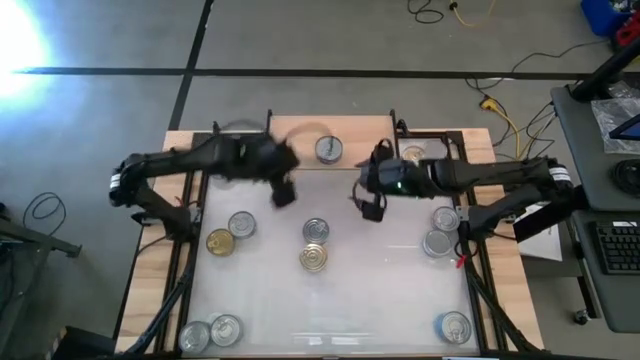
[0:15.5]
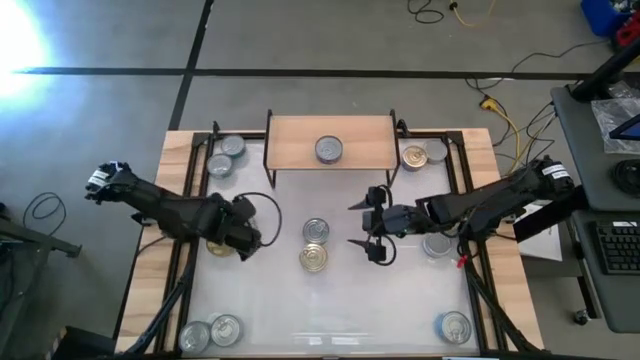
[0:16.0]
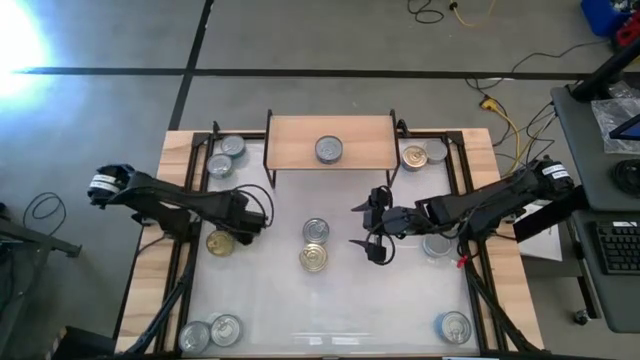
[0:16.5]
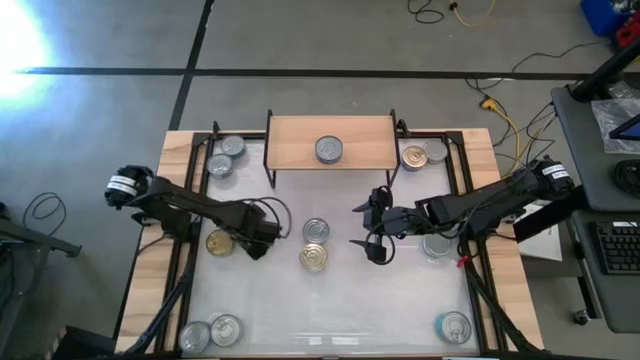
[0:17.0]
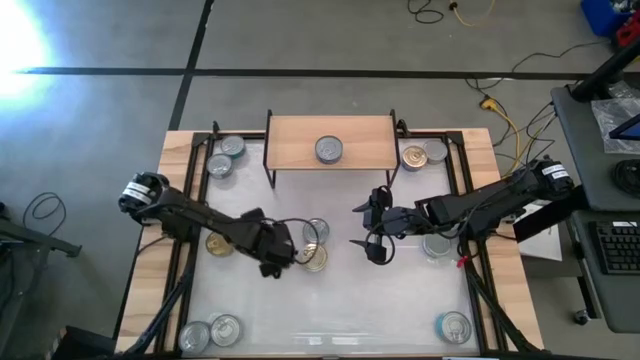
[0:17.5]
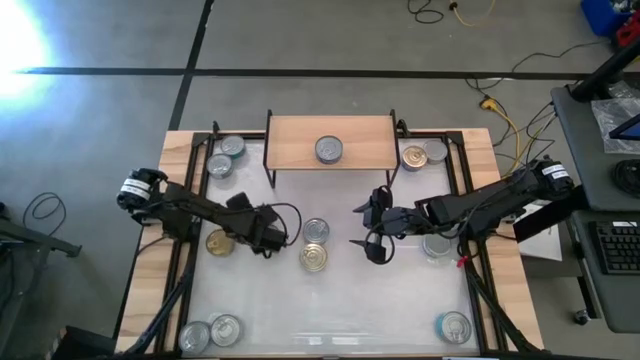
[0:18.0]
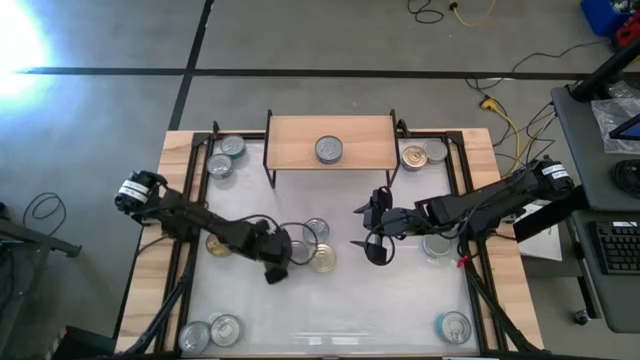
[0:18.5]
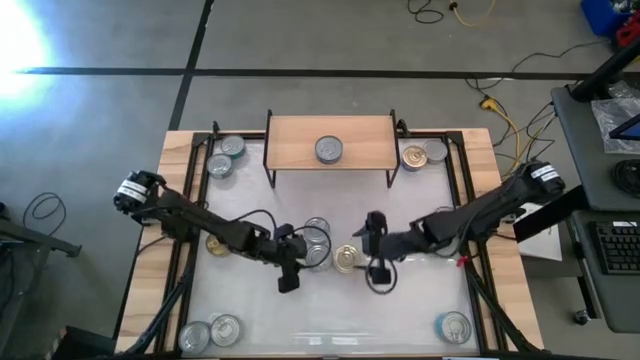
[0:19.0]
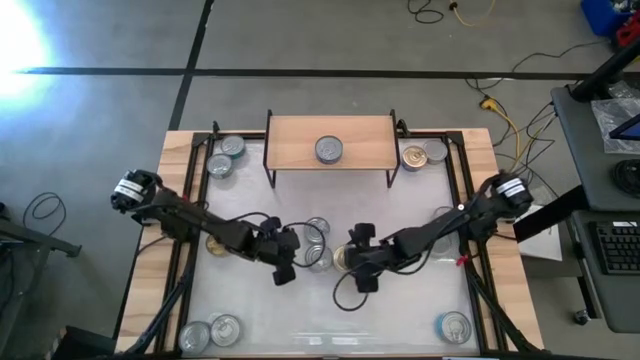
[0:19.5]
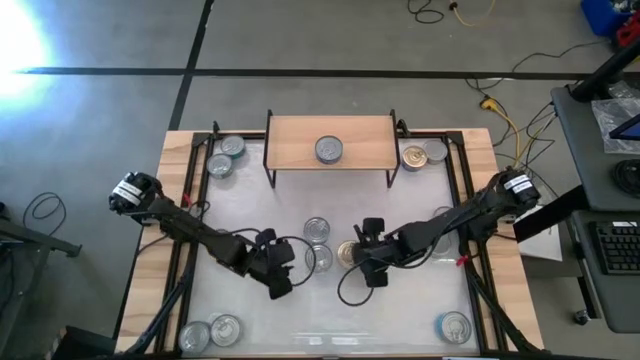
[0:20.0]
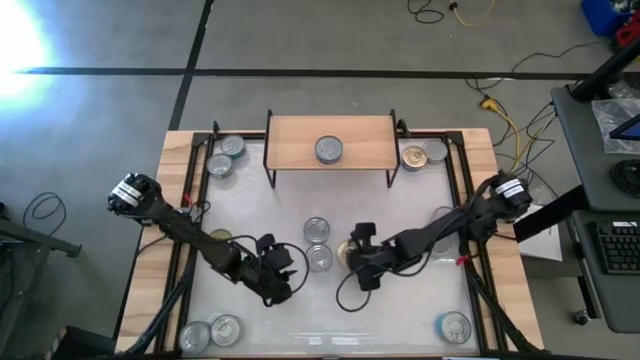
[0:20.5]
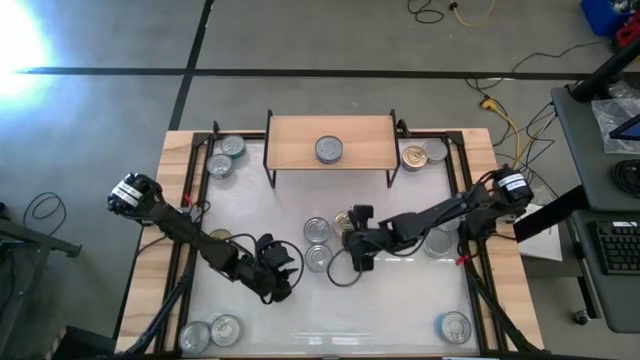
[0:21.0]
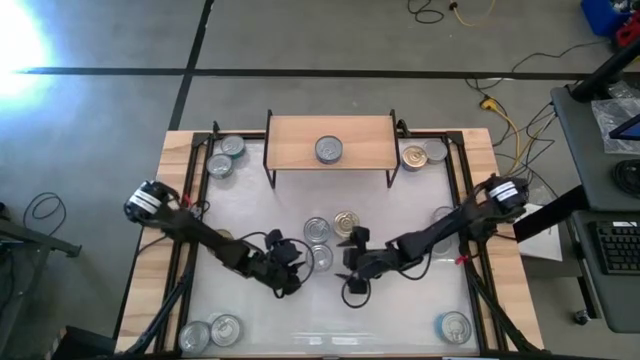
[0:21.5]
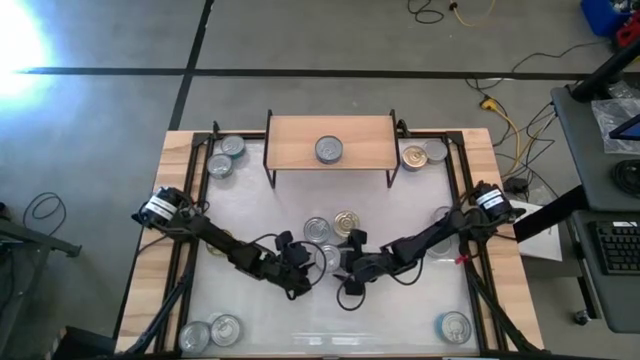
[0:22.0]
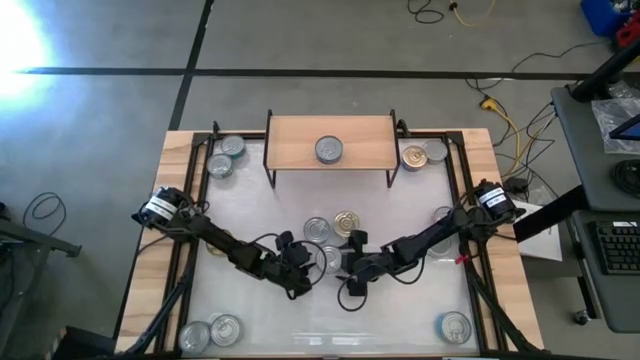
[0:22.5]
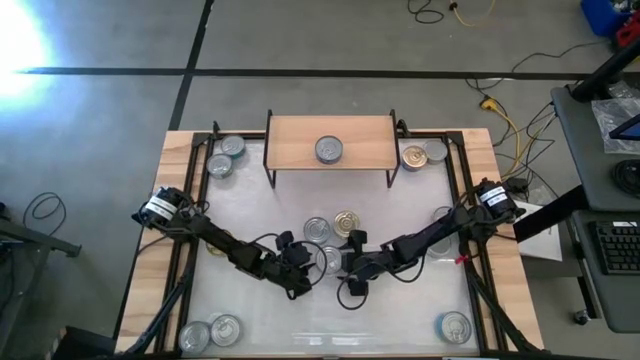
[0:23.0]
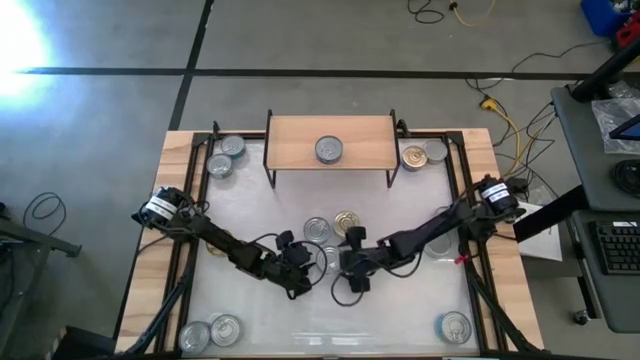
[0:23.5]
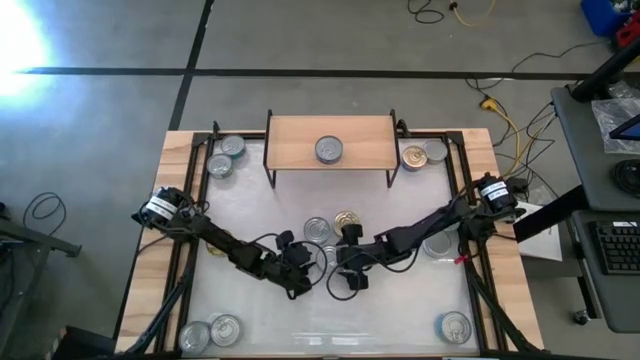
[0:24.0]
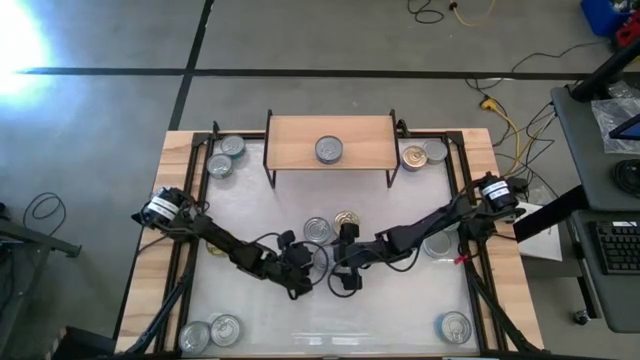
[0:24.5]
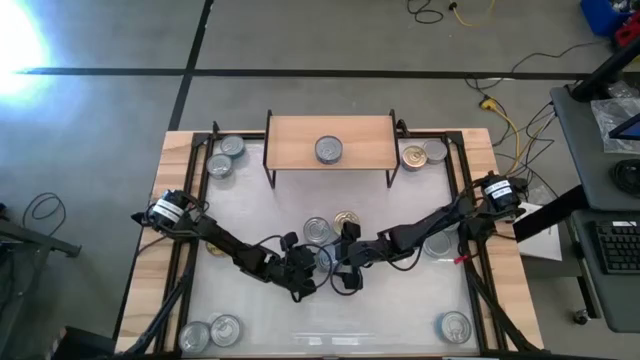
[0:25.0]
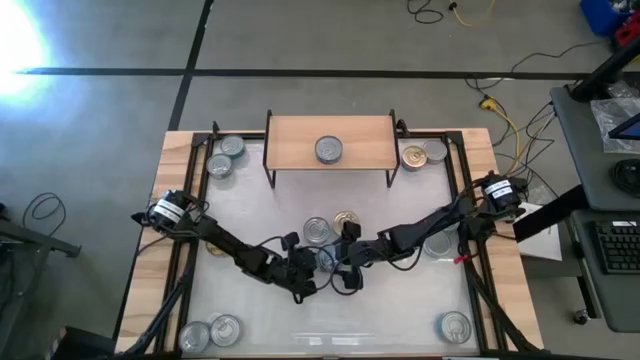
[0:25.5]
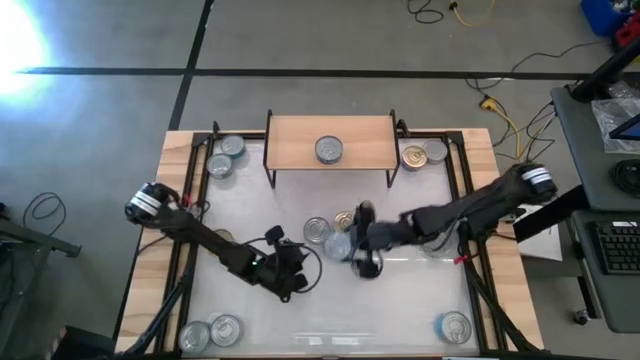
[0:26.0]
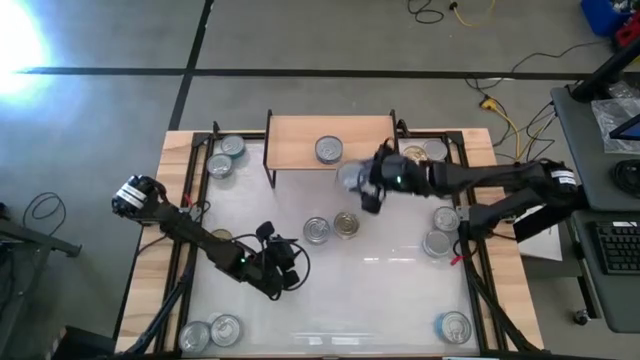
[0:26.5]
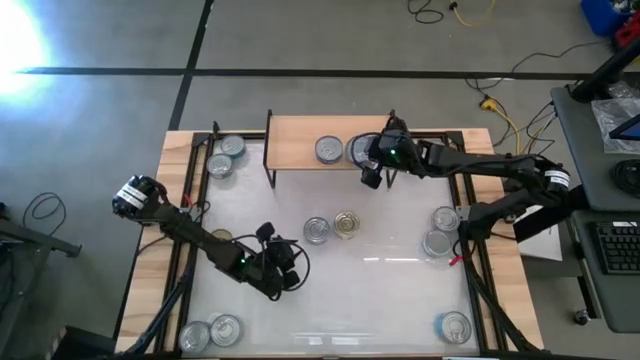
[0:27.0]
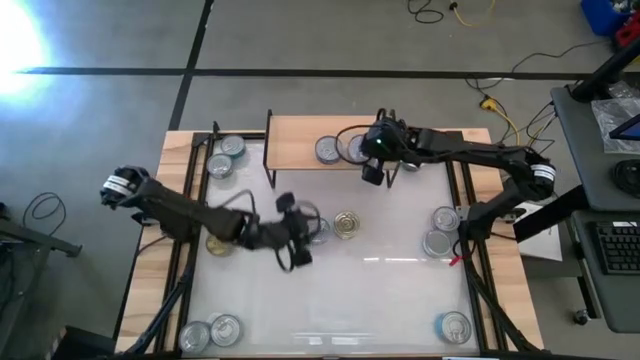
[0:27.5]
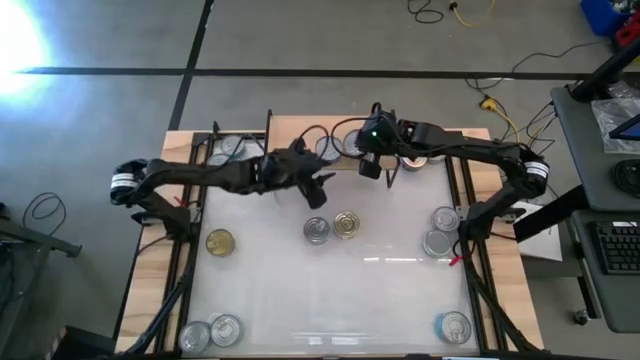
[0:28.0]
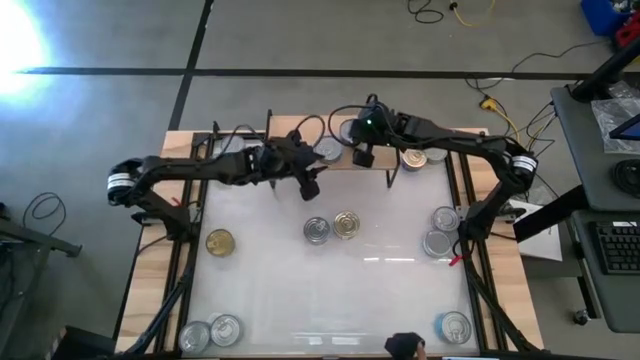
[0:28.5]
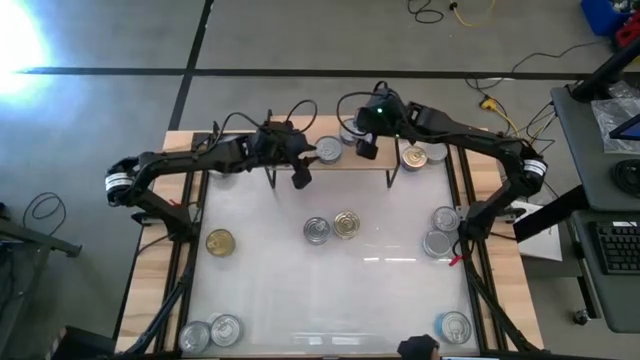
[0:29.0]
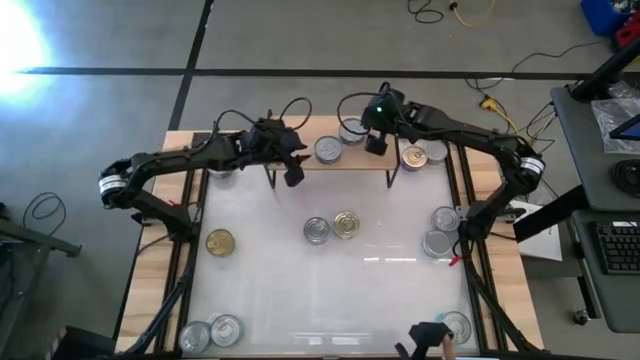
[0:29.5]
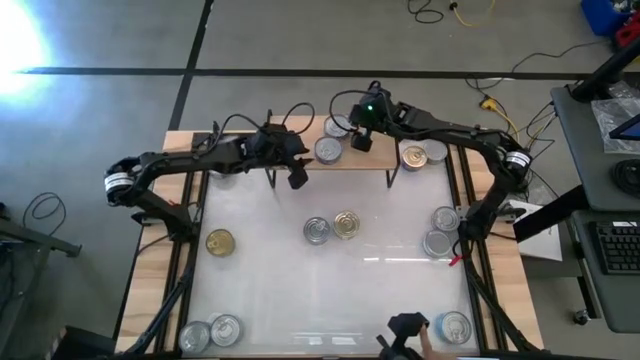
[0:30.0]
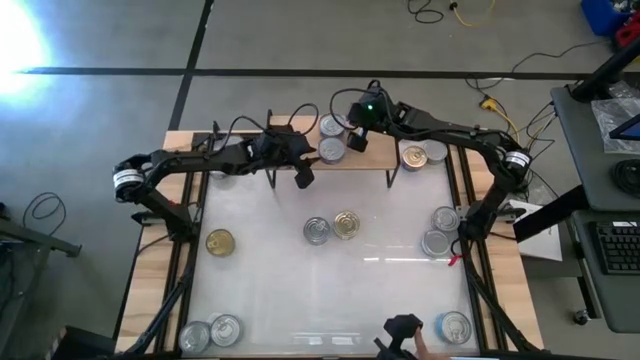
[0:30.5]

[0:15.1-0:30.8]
Task: Stack canned seafood by type on shelf
Put the blue tuna can on the shelf

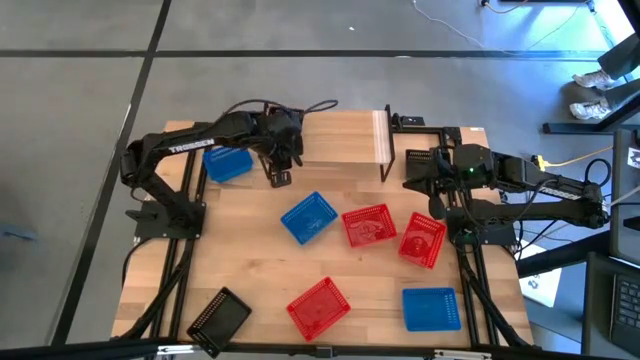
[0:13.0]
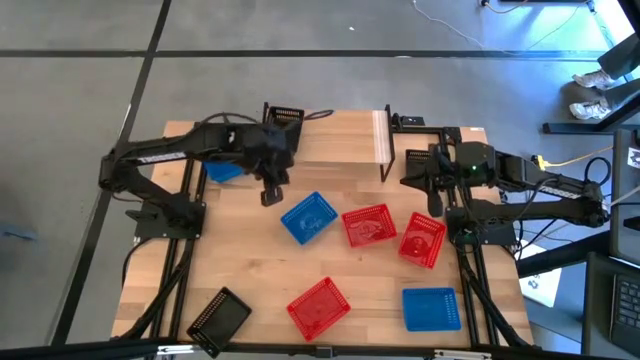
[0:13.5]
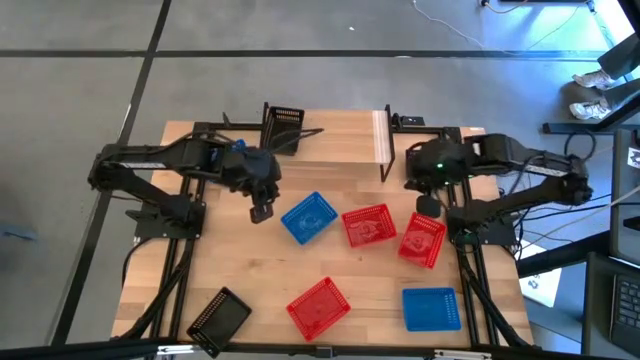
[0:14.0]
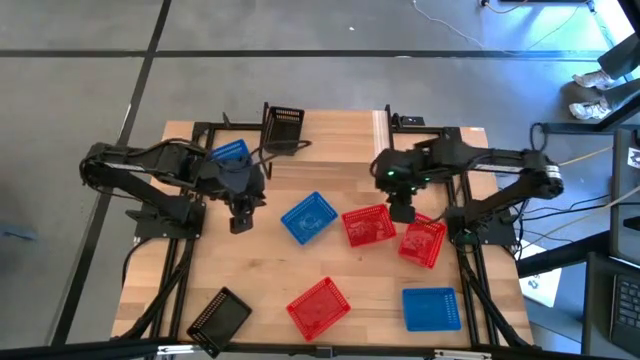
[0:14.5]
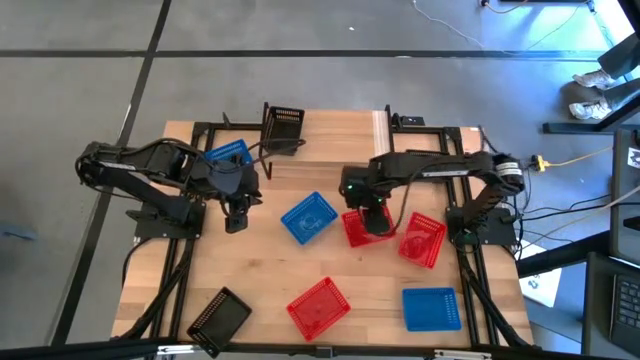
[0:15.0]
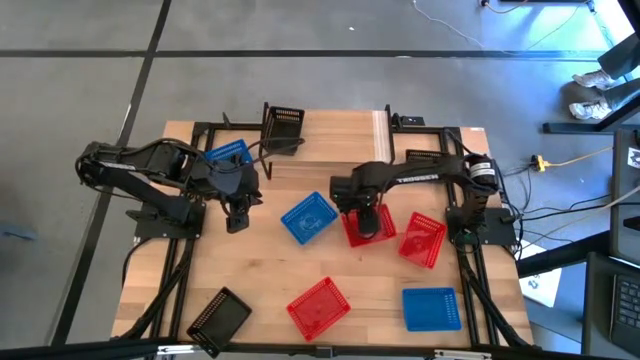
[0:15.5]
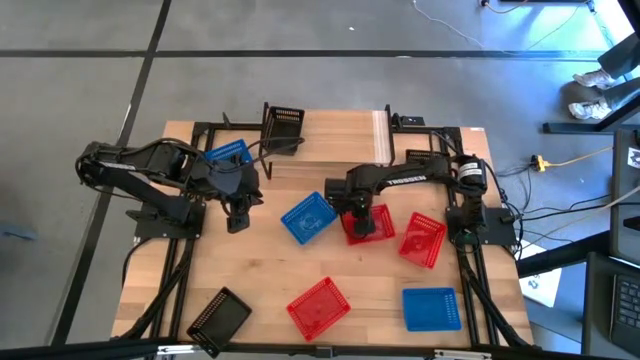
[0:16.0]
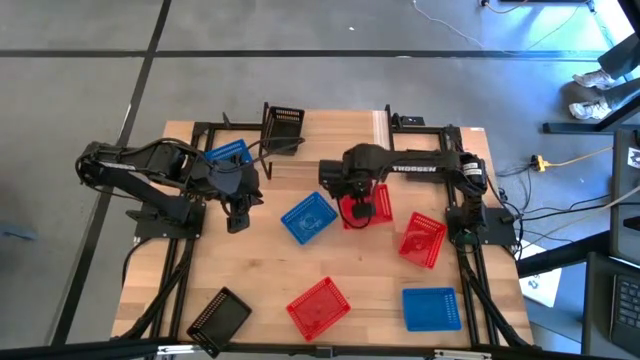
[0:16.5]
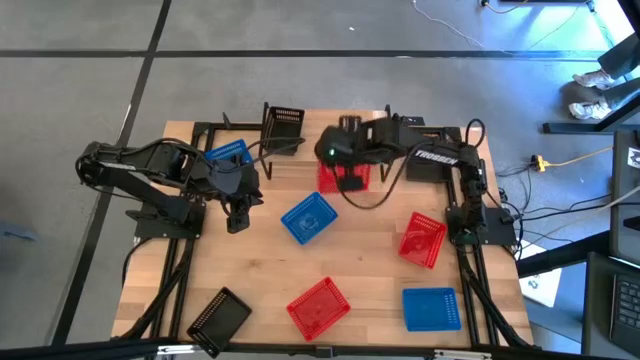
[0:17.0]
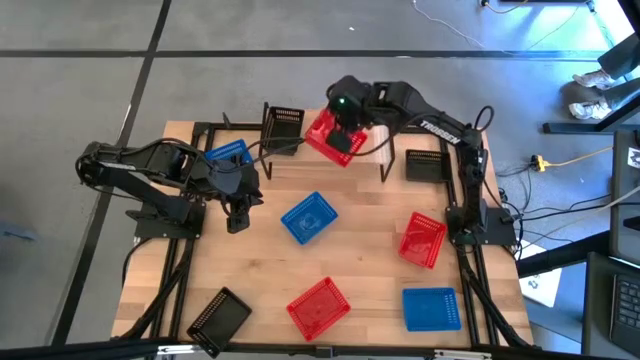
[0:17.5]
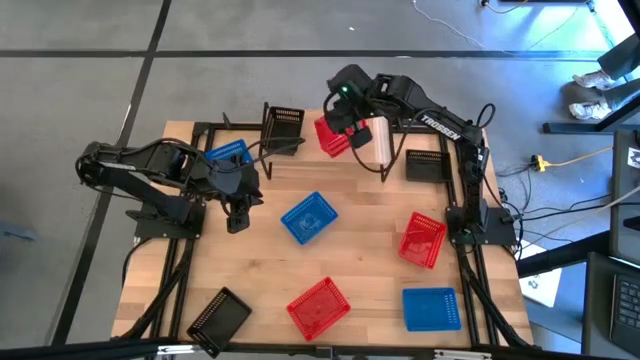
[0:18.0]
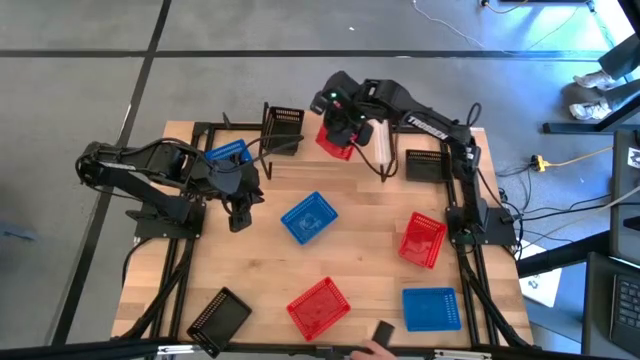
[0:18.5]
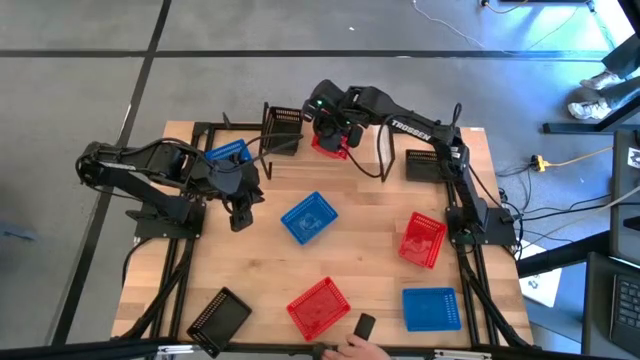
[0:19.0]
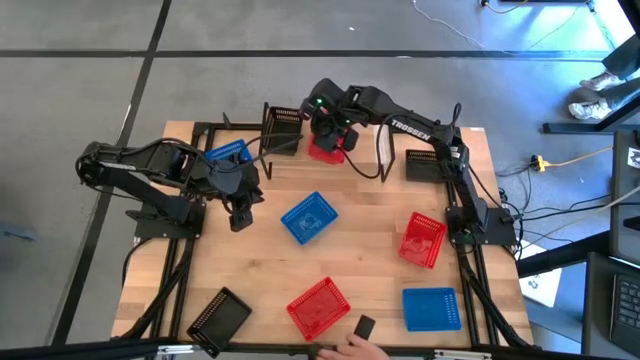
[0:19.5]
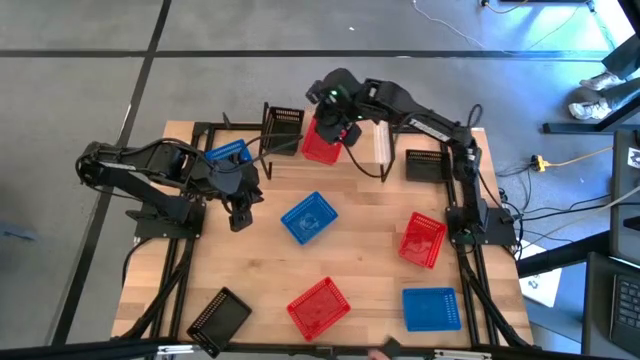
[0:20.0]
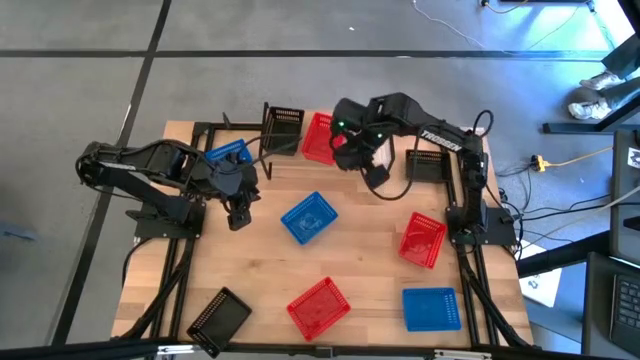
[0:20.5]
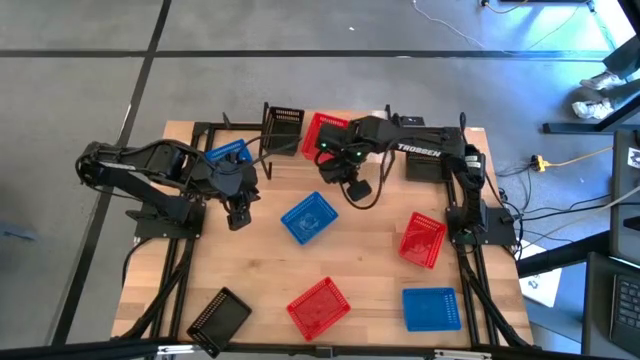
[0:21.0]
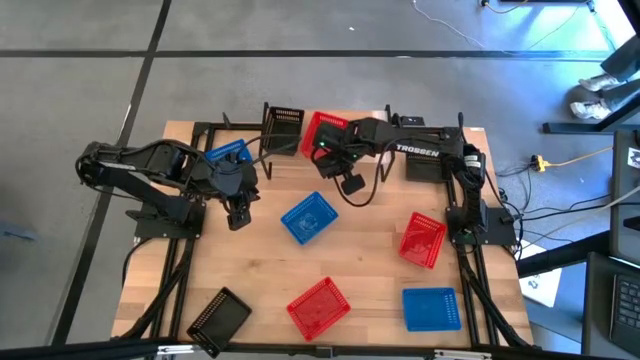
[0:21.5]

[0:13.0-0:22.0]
Task: Stack baskets on shelf by color
Put the top red bin on the shelf
